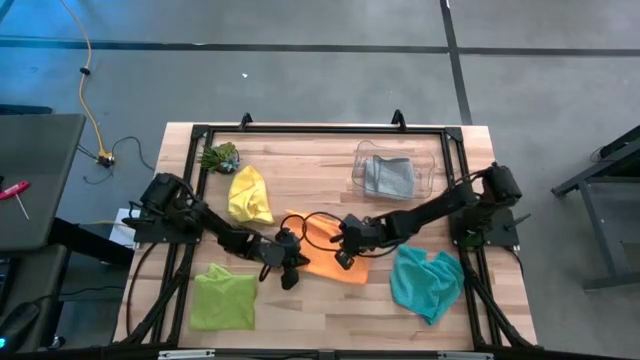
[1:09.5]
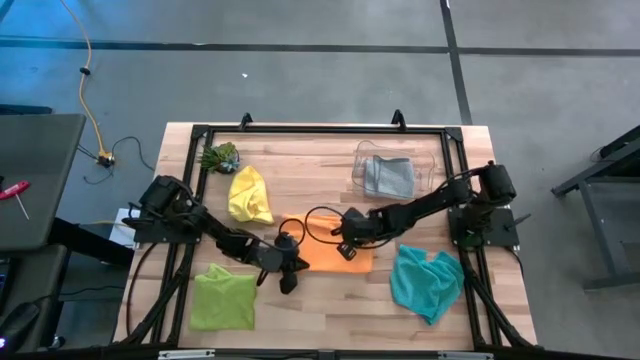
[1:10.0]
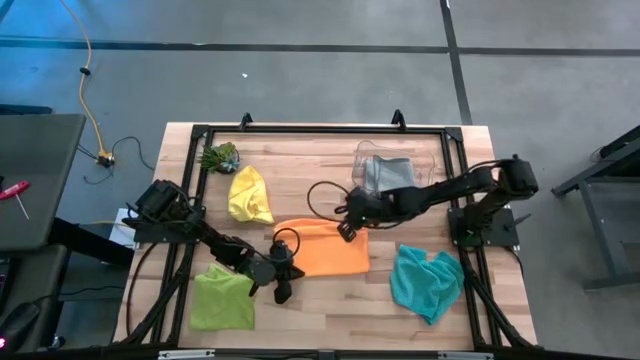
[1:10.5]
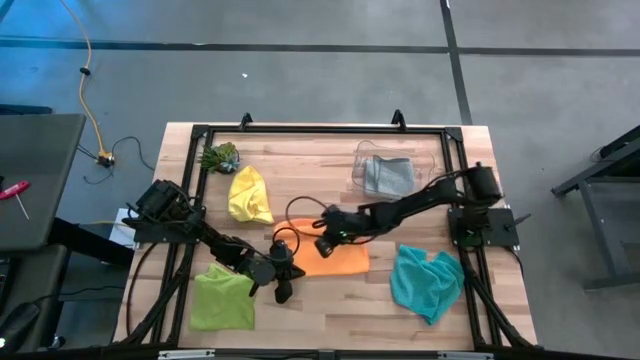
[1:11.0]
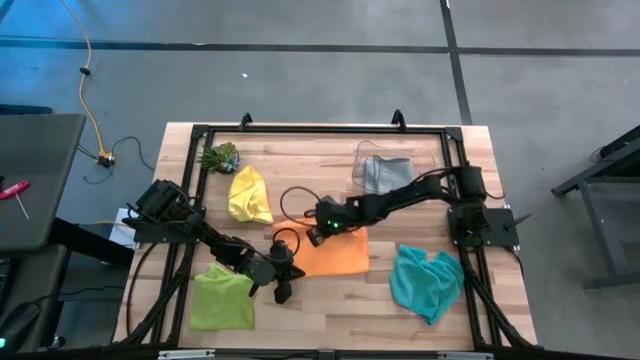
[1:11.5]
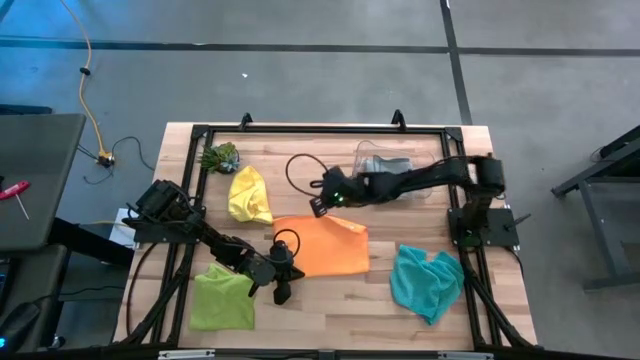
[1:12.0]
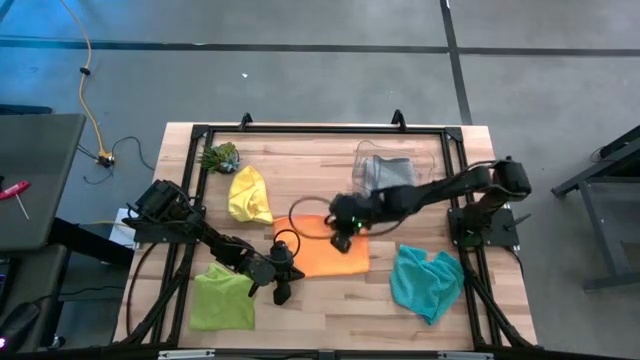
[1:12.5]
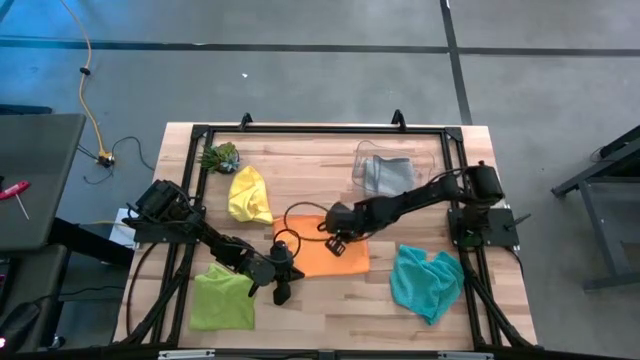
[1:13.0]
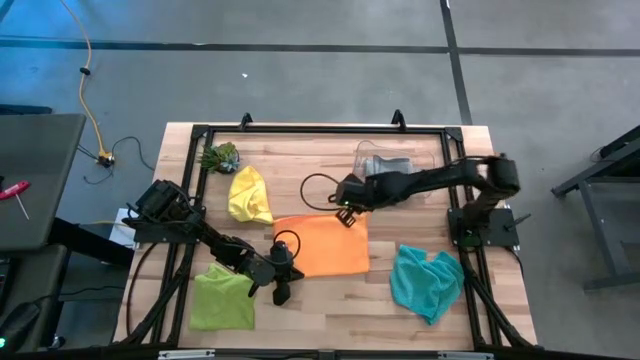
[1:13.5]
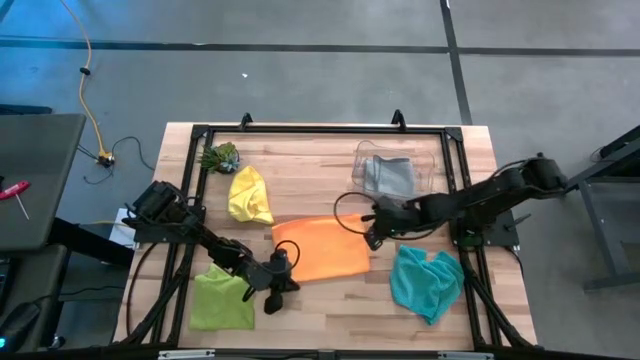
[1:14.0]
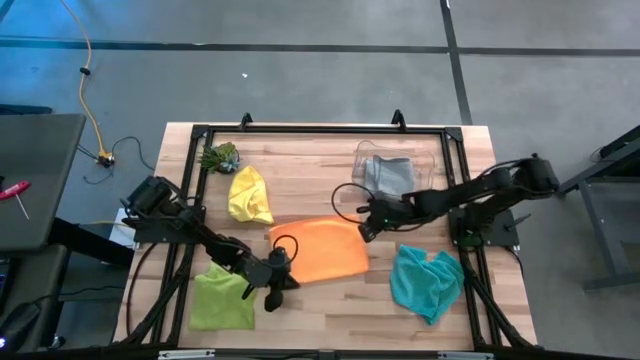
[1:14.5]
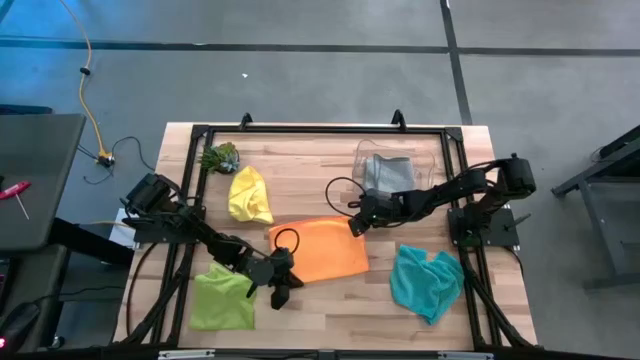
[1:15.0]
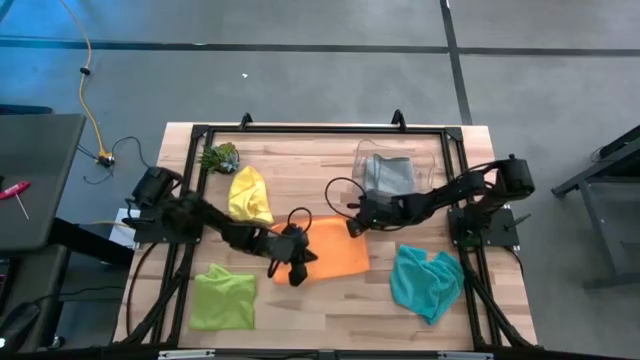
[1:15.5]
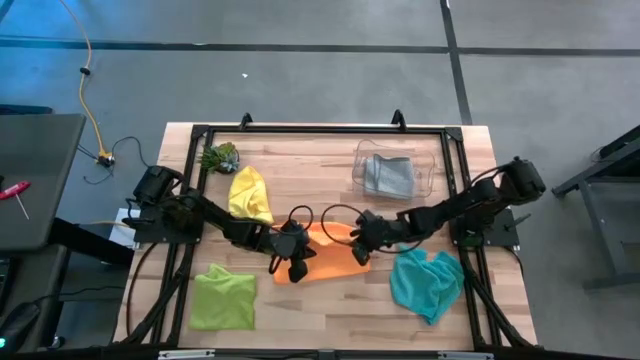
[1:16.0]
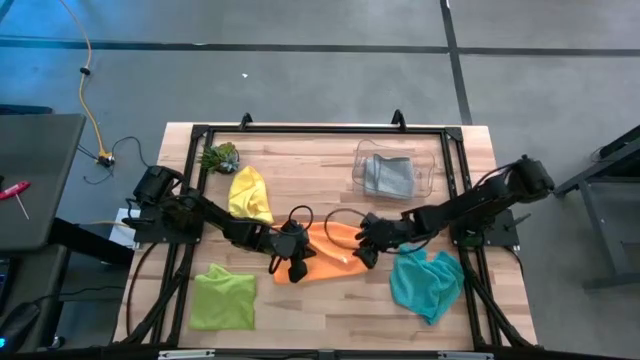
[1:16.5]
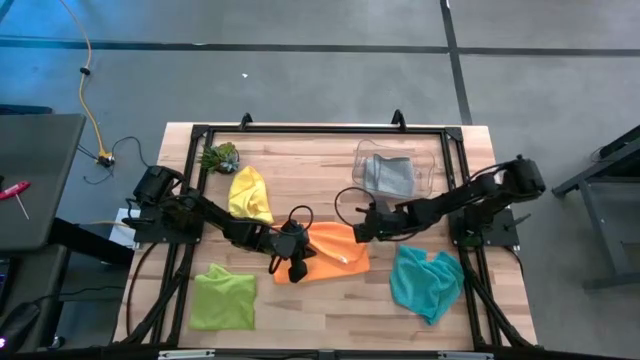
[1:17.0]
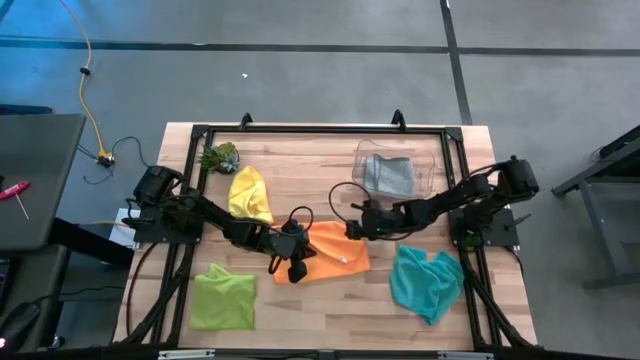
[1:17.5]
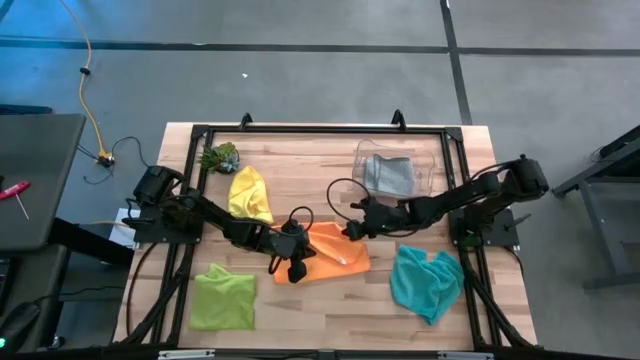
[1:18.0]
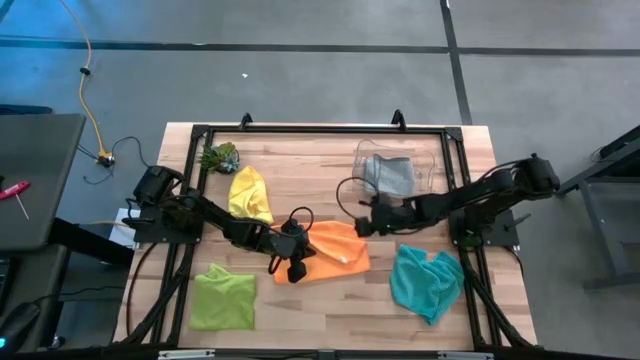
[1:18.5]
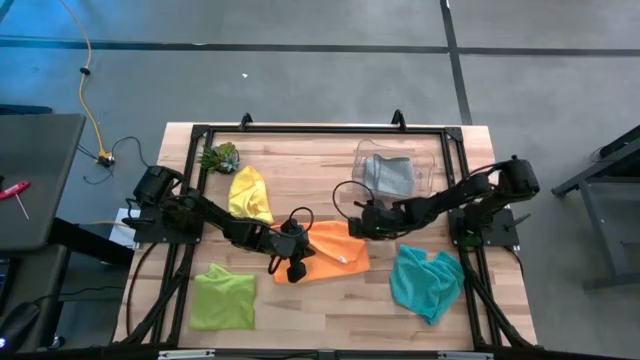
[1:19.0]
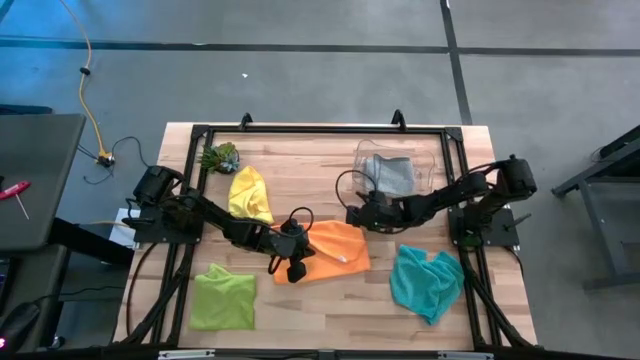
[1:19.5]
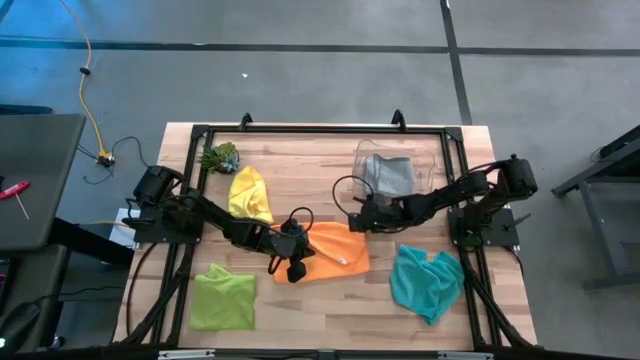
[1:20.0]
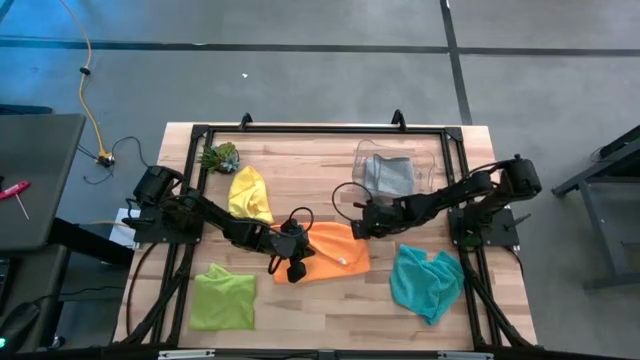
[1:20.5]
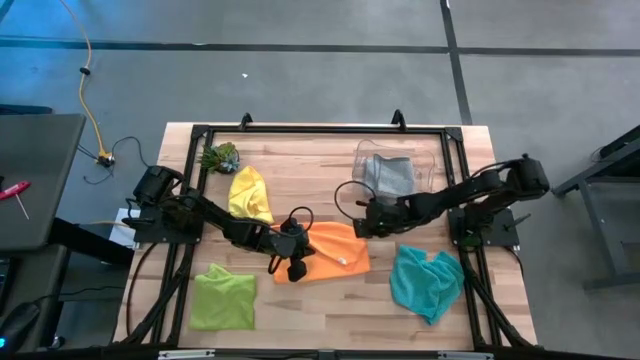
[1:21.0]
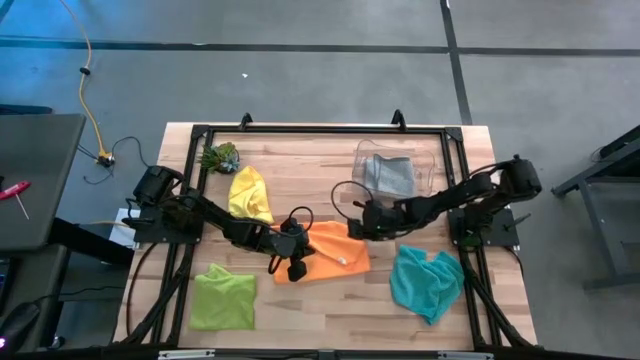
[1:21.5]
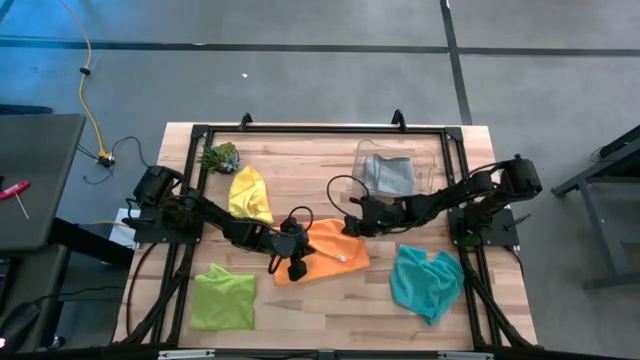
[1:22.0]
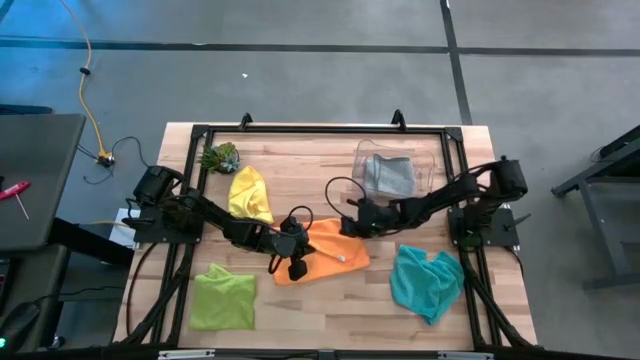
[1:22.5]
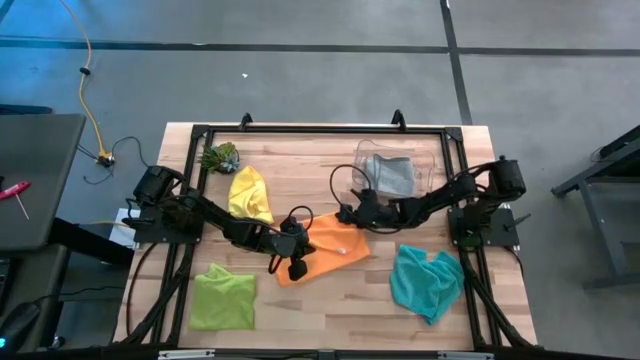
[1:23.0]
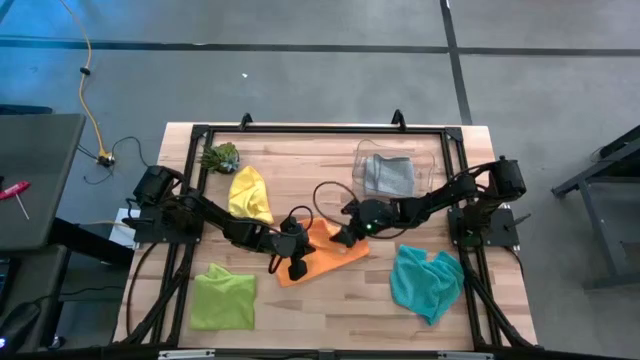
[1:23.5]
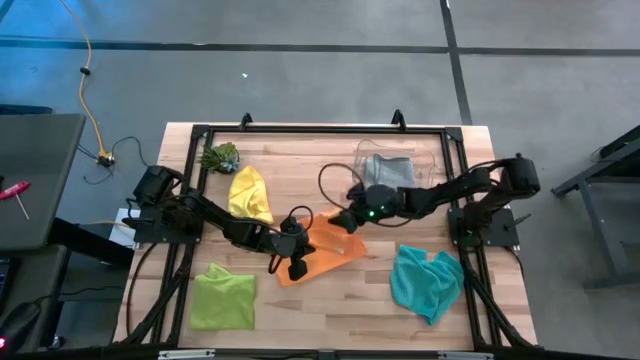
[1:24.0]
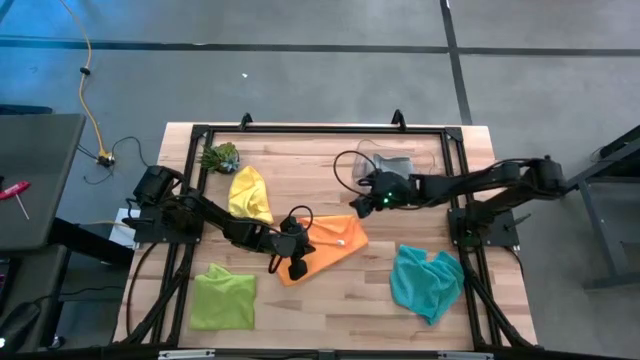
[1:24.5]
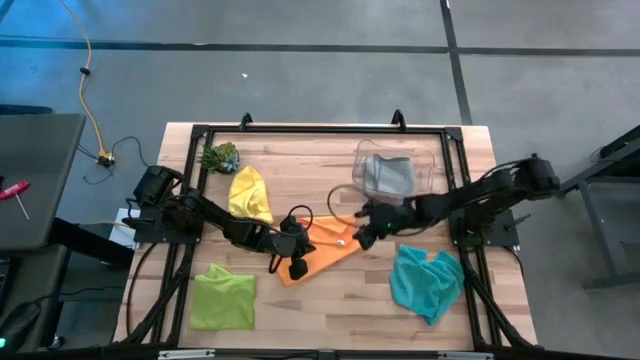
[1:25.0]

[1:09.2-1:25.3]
Task: Fold microfiber towels
Fold the orange microfiber towel

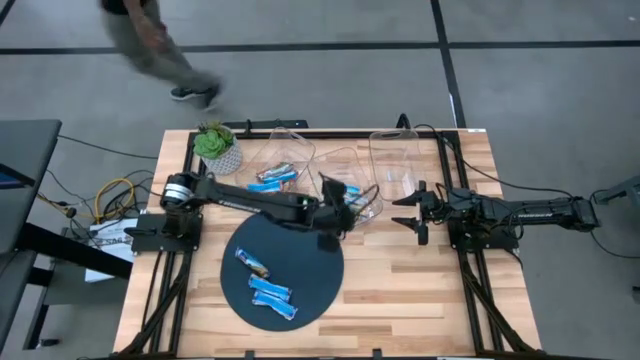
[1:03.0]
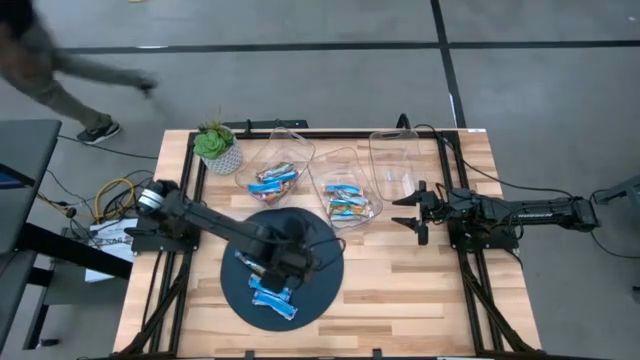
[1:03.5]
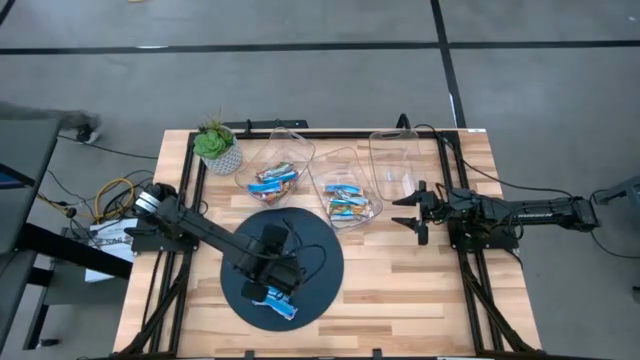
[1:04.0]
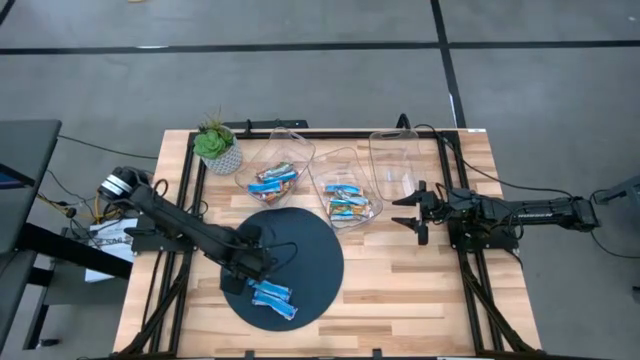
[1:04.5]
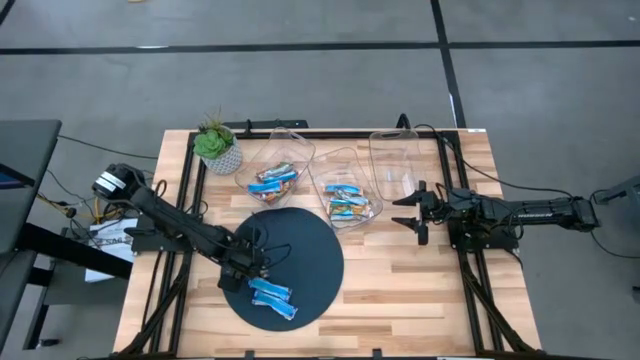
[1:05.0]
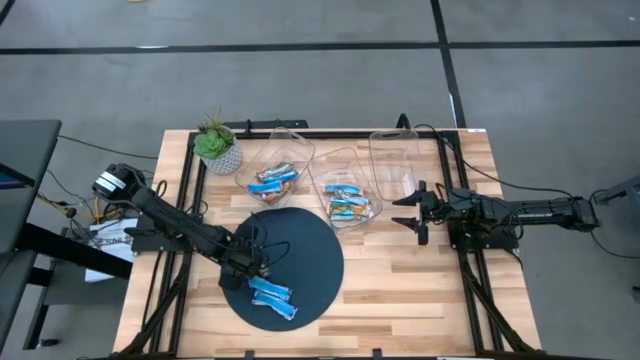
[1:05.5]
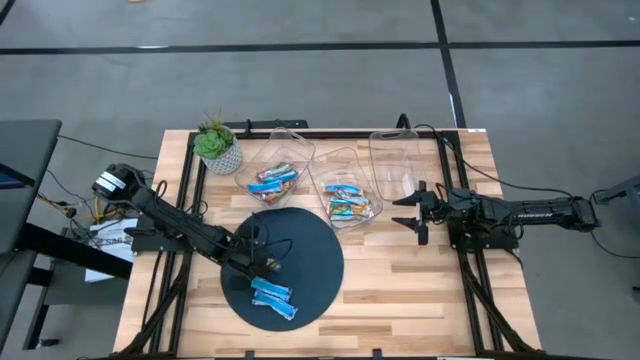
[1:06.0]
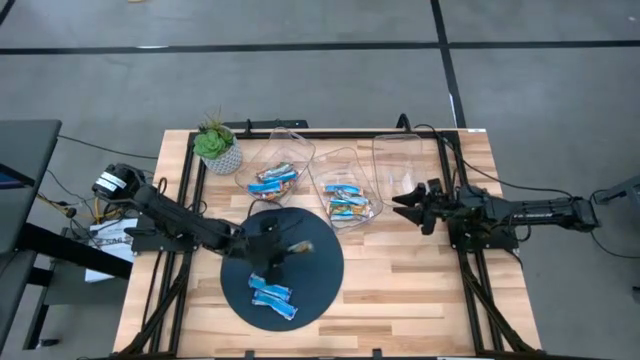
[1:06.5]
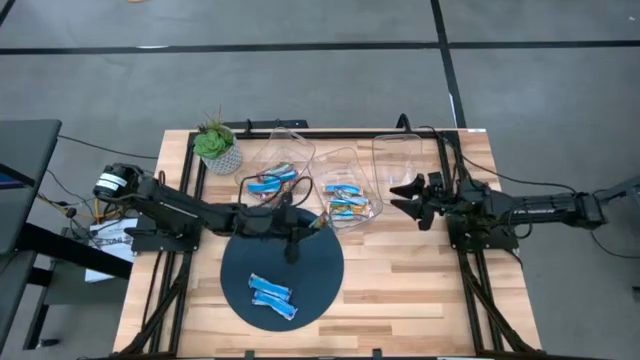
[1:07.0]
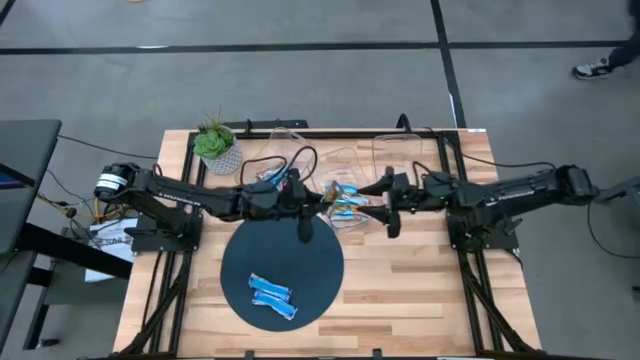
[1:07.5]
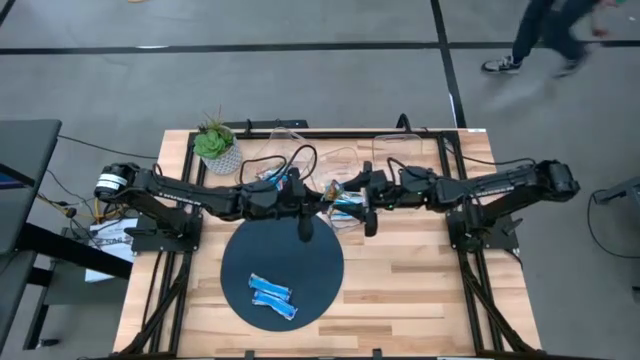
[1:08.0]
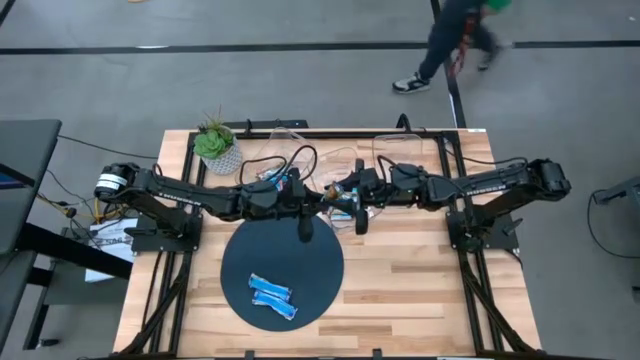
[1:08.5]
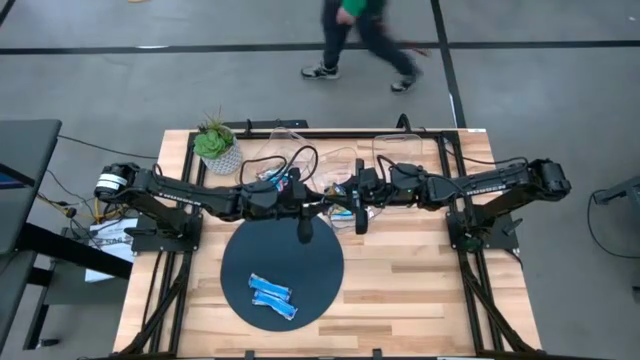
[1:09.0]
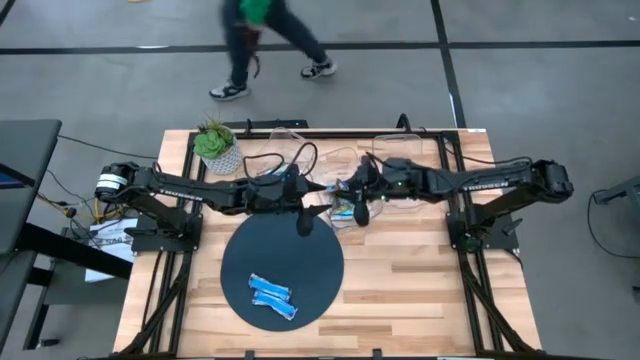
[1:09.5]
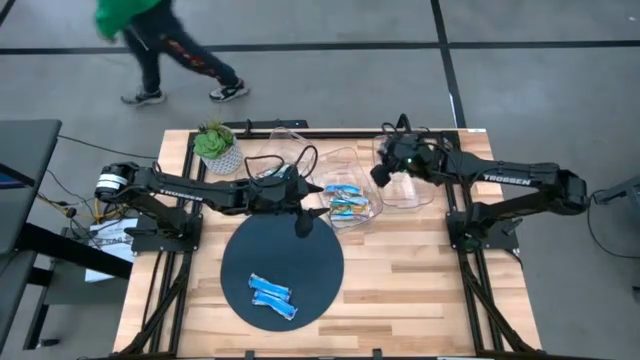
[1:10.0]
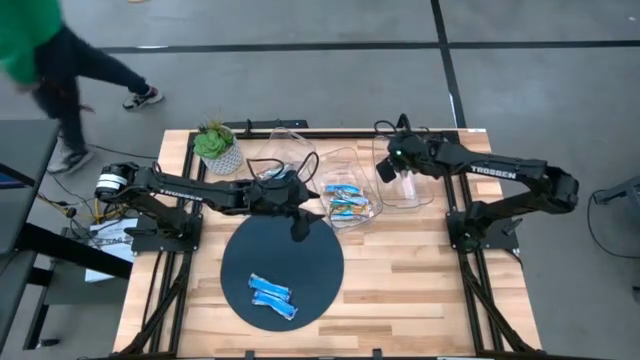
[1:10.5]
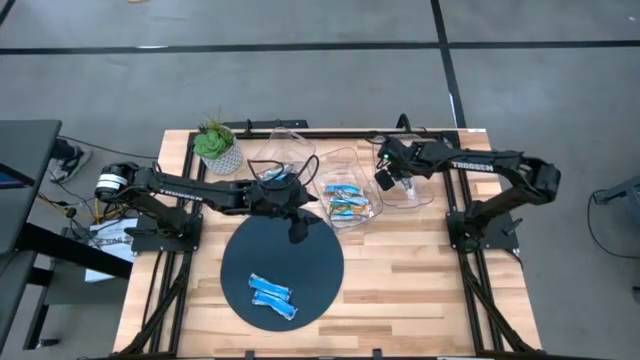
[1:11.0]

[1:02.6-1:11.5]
Task: Pick and place Granola Bars by type
Put the blue granola bar into the right transparent bin
